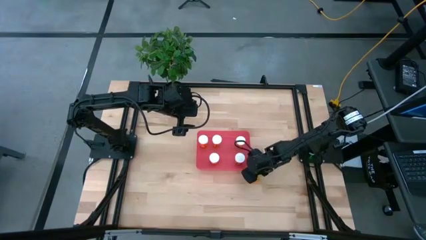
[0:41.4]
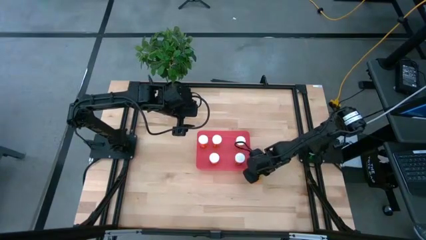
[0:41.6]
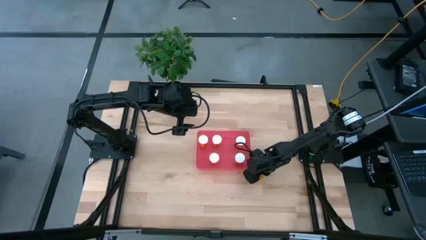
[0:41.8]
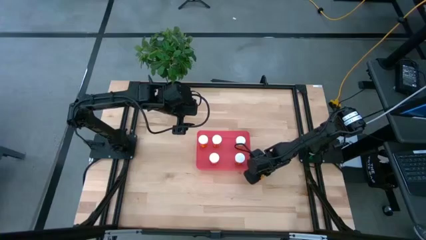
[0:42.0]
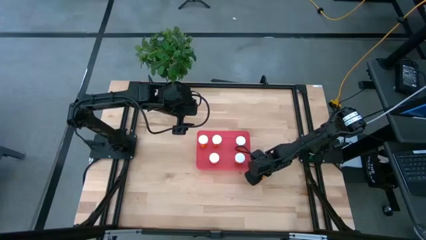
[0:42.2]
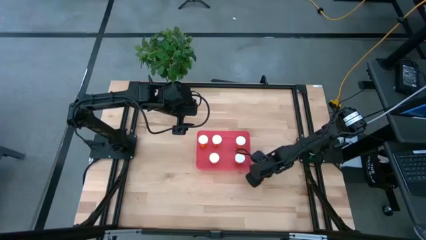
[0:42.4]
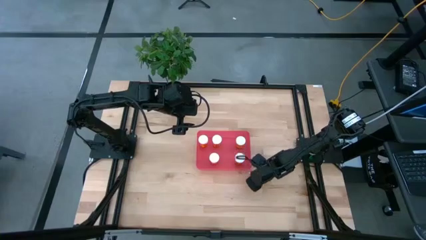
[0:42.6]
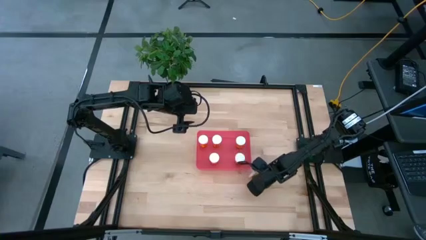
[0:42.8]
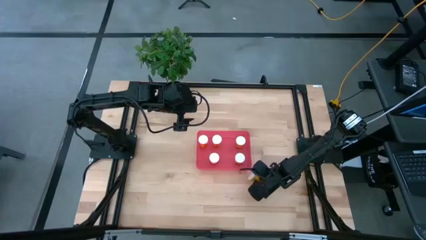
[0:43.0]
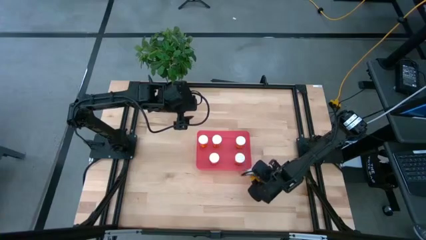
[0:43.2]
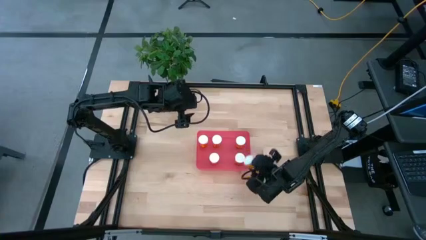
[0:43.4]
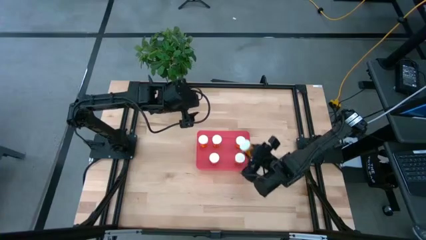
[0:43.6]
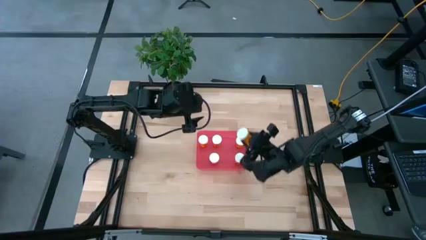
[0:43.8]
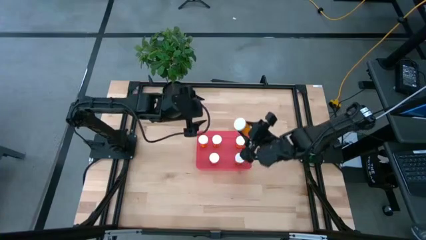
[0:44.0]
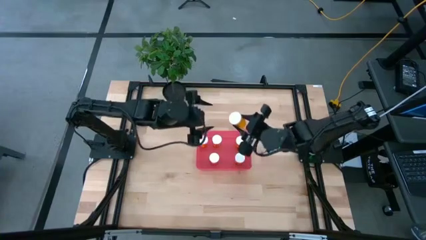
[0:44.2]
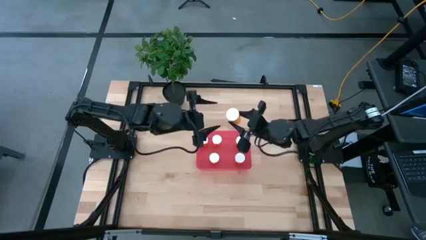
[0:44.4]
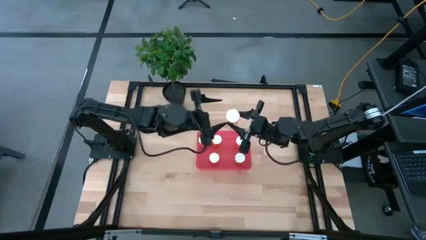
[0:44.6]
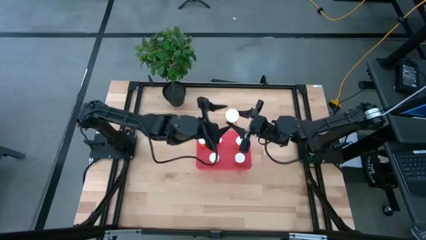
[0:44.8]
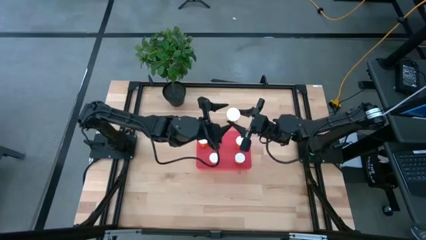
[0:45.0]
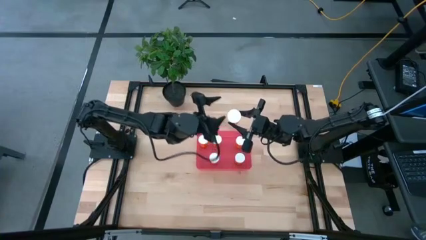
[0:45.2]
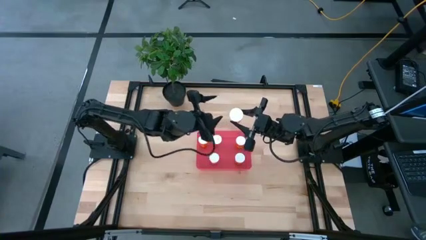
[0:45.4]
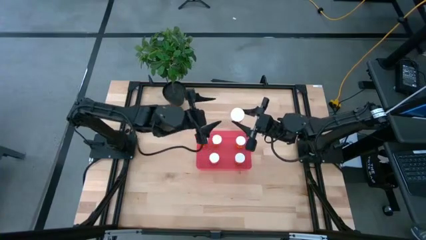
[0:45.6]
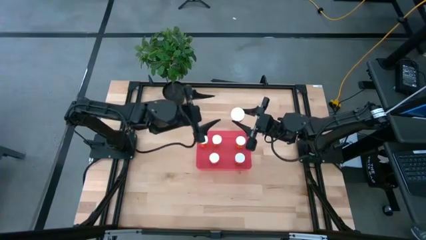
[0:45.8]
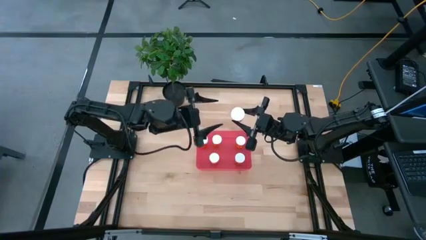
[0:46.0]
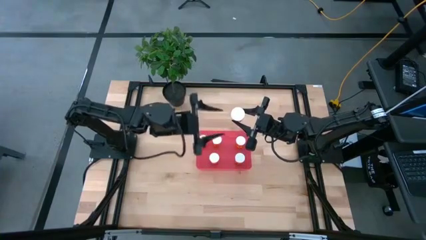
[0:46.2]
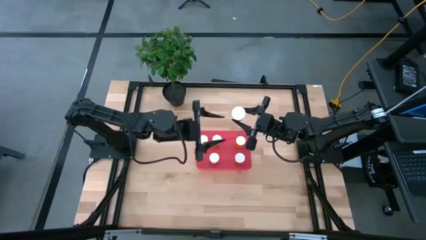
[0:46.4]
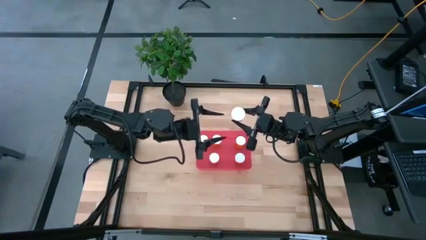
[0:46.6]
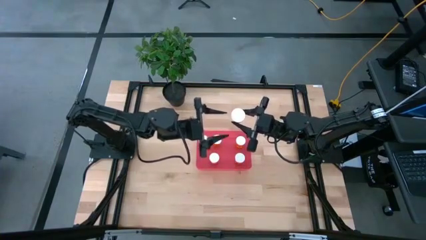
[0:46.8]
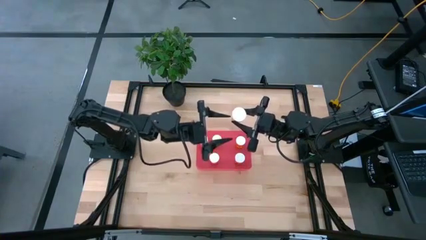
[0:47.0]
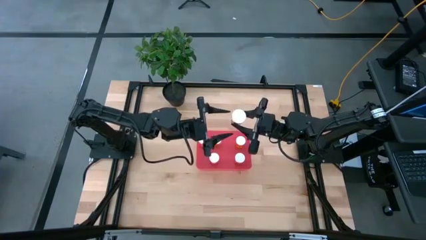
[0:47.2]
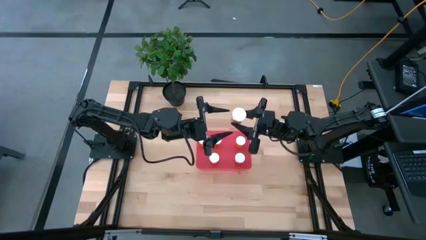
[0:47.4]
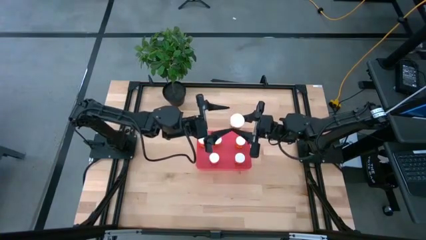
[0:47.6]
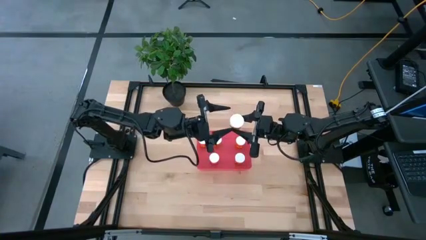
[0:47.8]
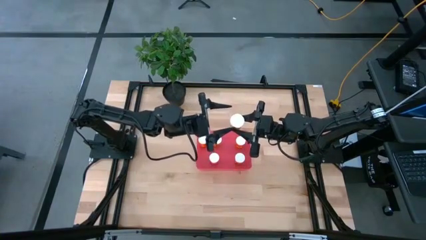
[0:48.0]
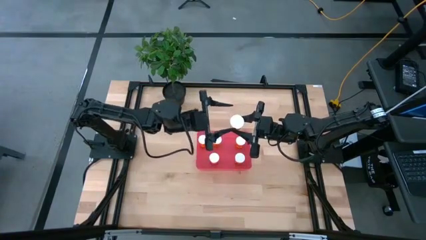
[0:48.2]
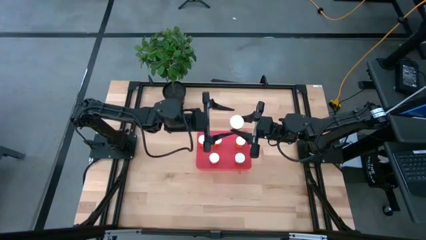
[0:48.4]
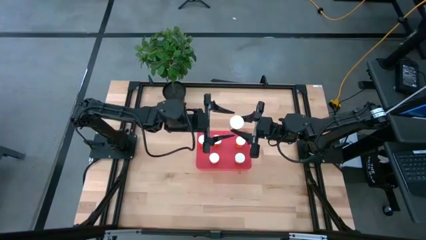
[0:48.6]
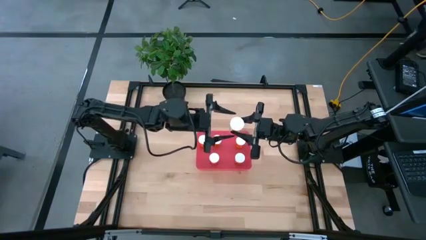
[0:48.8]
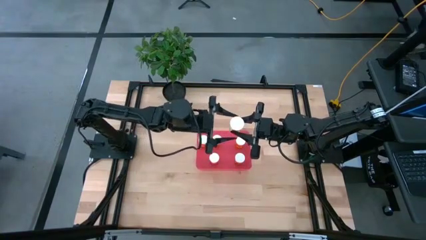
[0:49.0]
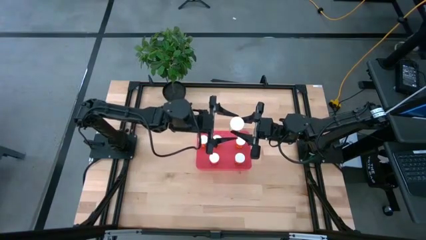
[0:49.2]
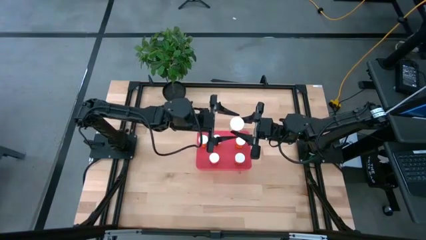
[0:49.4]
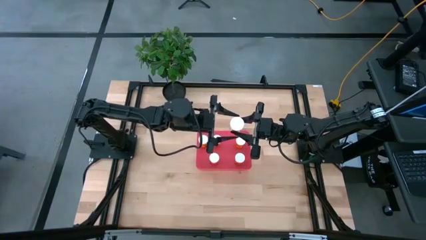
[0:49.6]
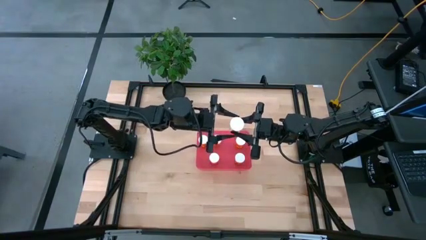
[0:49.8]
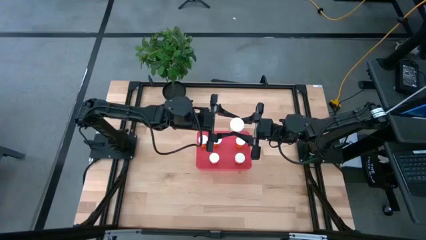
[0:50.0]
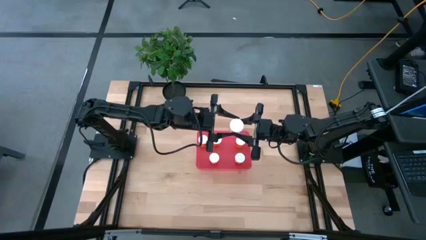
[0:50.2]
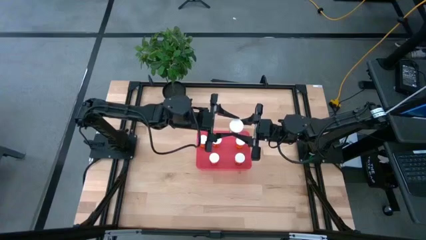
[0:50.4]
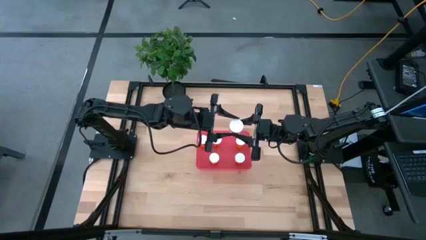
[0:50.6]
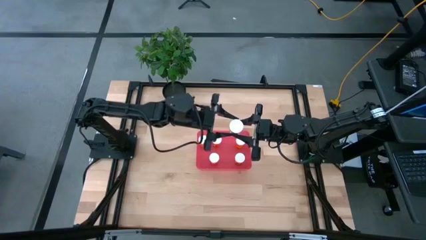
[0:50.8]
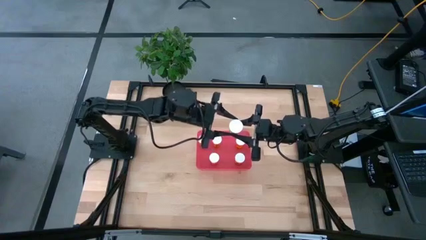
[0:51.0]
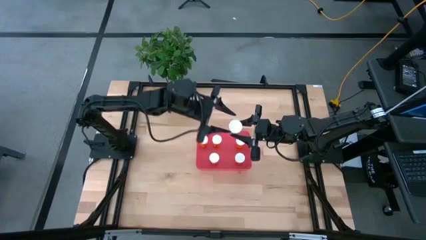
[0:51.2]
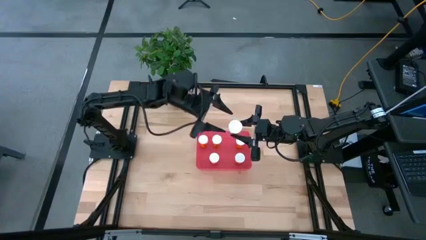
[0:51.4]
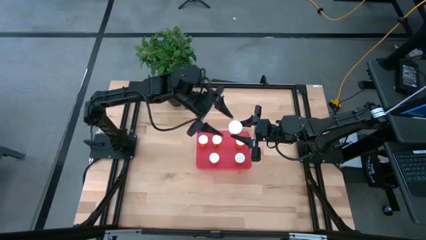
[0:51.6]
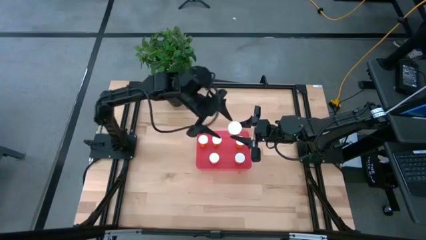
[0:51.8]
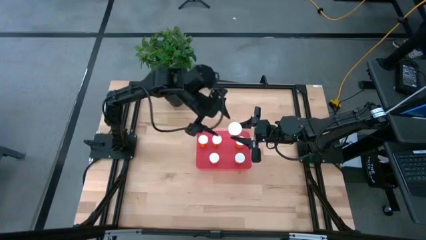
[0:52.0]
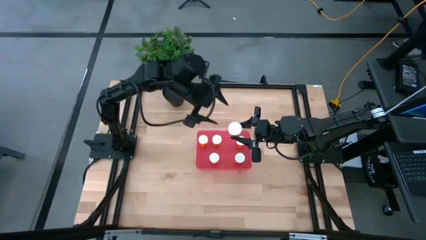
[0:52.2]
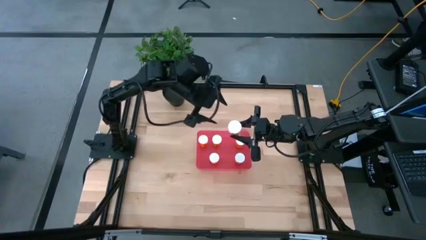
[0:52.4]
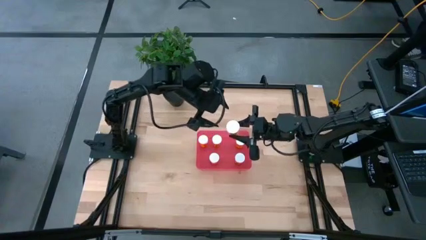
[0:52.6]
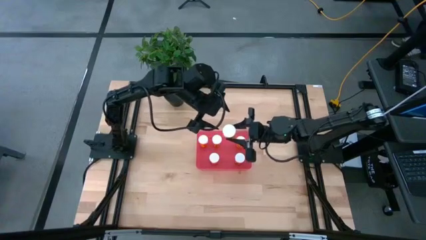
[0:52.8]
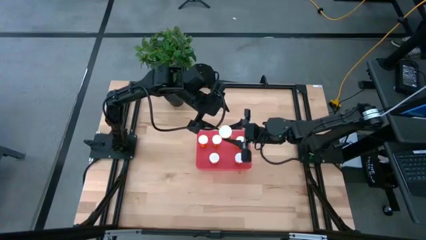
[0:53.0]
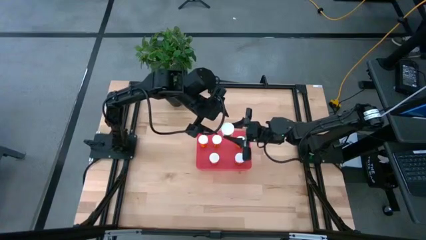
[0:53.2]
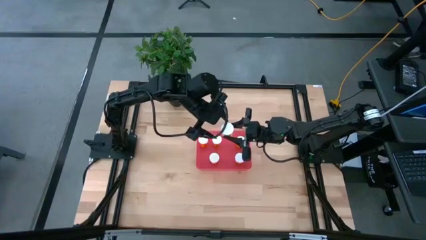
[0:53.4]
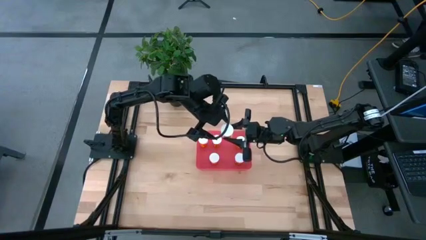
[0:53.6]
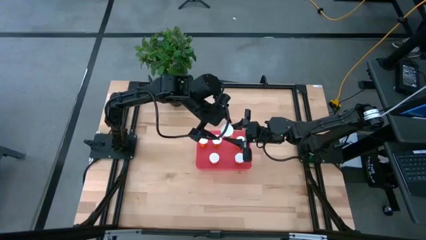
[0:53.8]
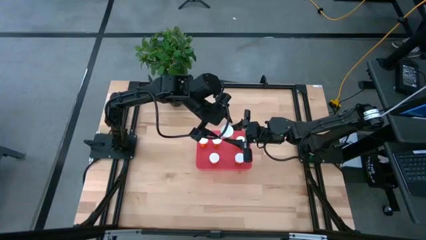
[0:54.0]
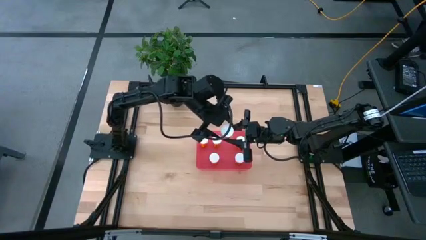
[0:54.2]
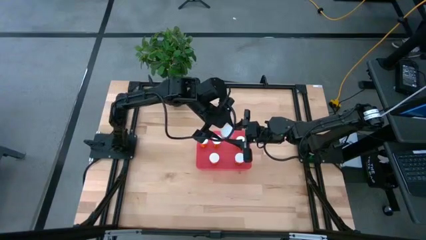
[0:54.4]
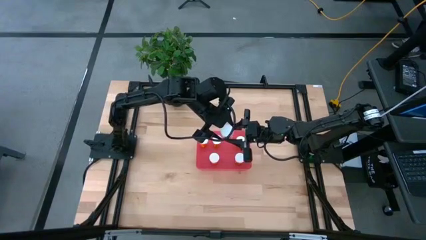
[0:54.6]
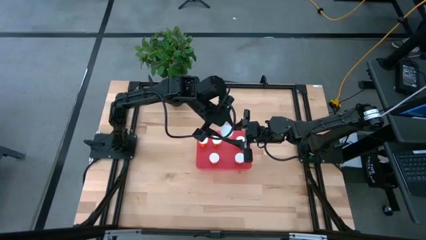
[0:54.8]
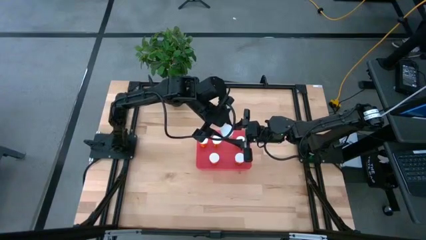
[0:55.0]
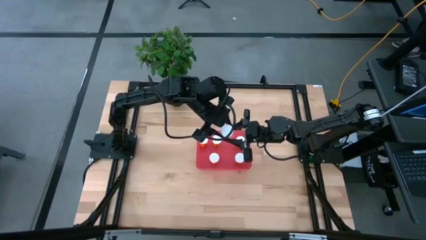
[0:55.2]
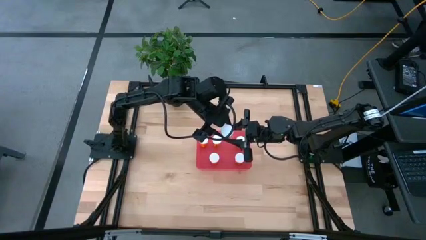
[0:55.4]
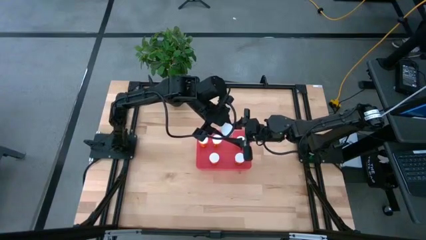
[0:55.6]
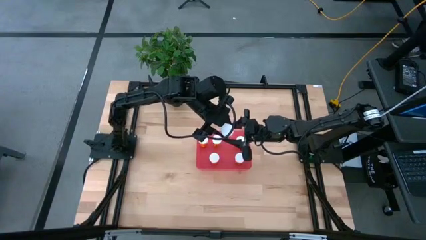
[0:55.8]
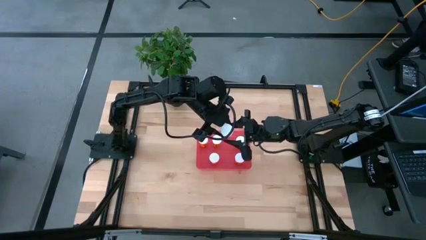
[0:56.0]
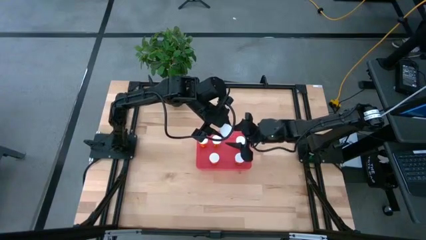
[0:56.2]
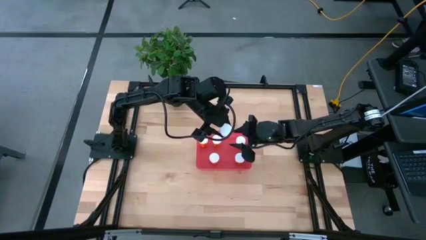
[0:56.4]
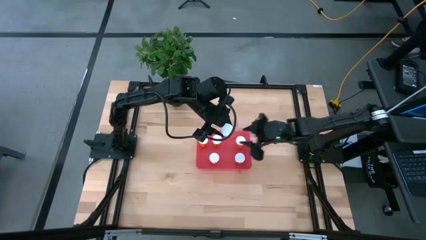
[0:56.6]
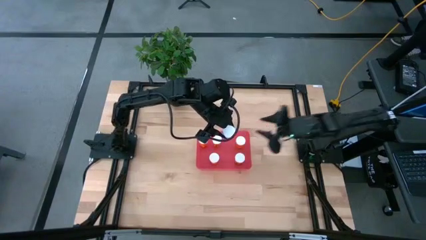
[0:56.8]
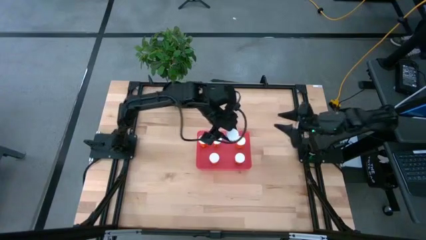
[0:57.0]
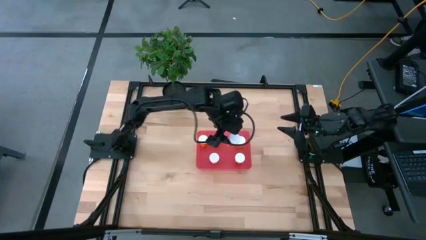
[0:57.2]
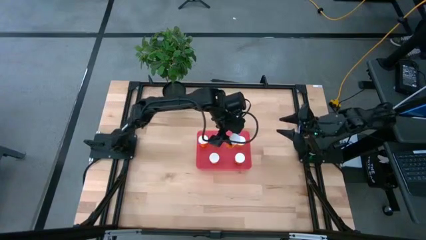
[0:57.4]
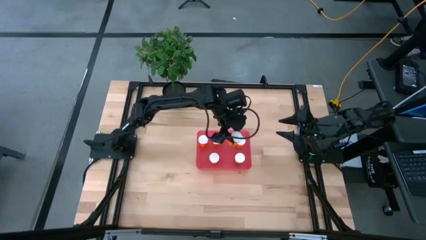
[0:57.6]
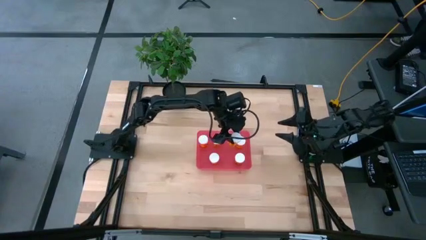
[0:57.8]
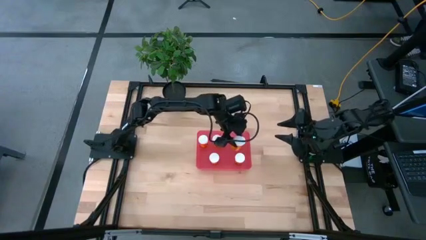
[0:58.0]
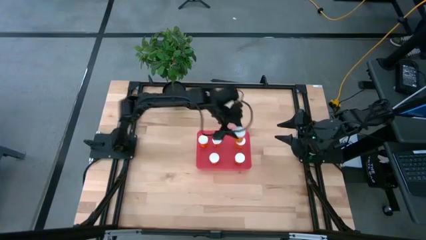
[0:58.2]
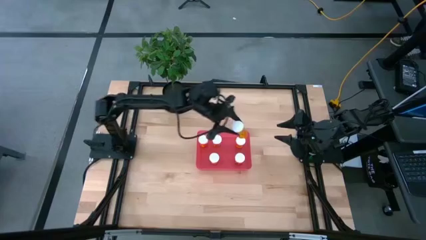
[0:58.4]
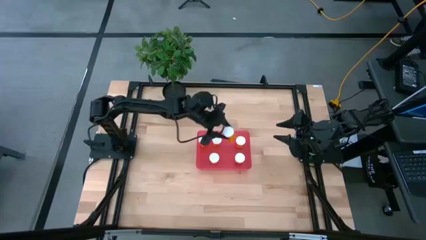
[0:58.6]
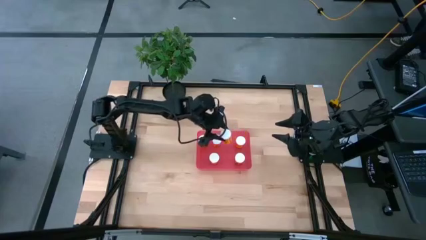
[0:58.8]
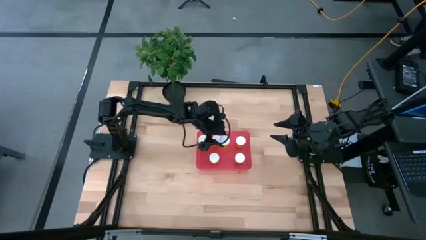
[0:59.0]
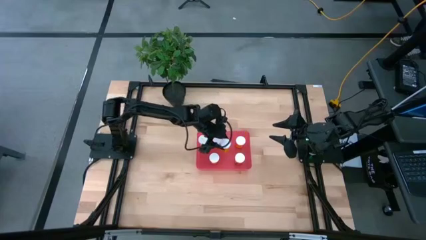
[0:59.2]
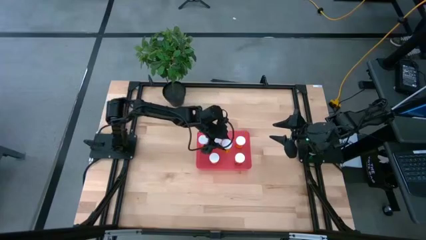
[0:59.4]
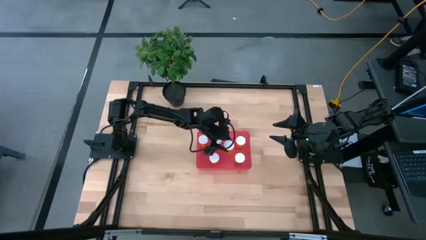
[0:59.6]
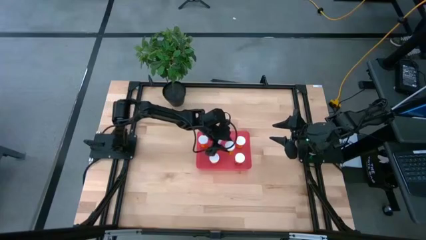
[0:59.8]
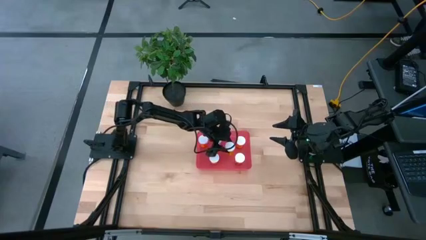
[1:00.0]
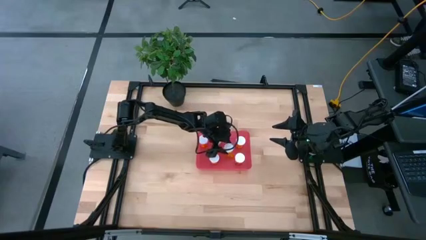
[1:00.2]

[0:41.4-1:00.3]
Task: Pick and place pill bottles into a basket
Put the orange pill bottle into the red bin
